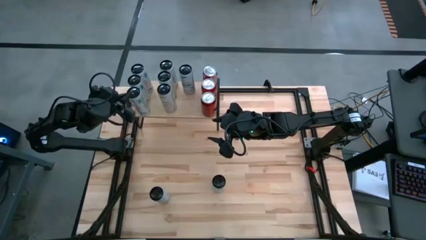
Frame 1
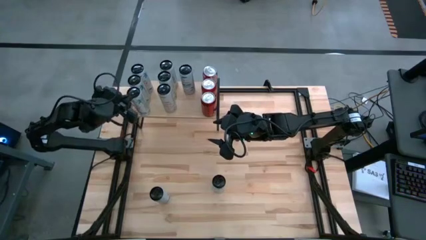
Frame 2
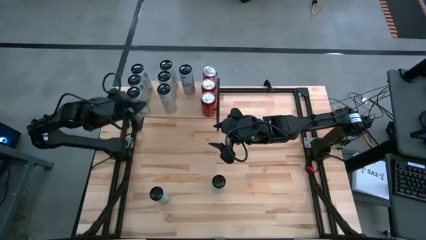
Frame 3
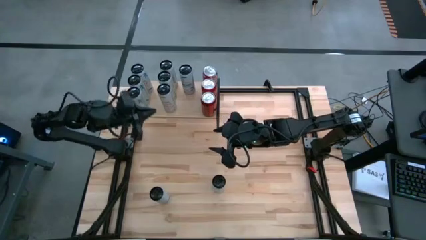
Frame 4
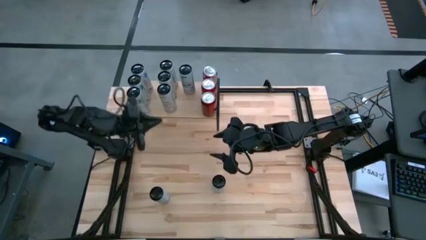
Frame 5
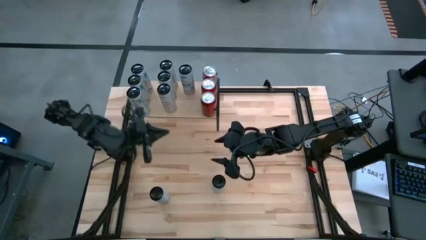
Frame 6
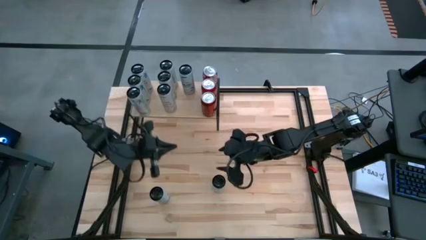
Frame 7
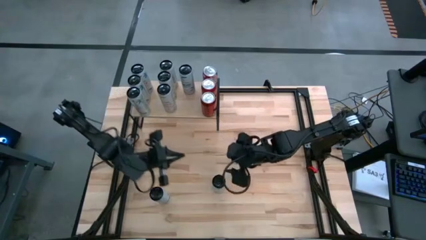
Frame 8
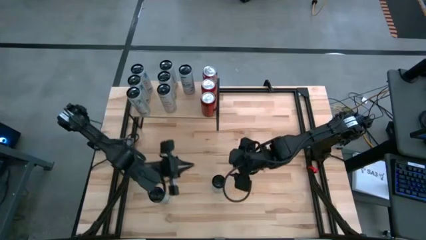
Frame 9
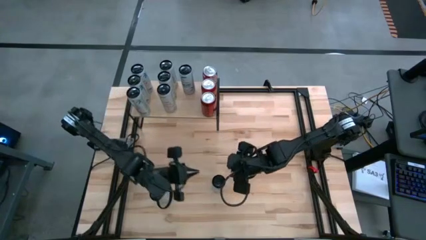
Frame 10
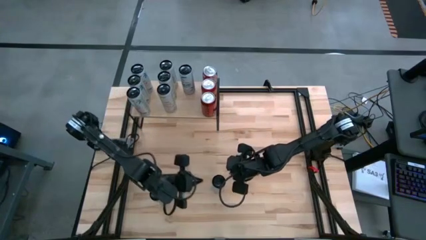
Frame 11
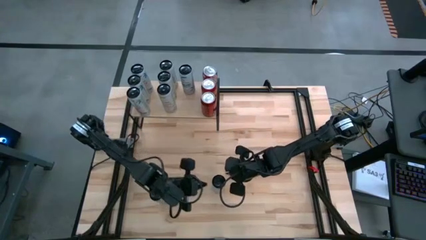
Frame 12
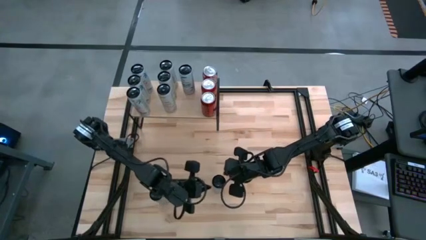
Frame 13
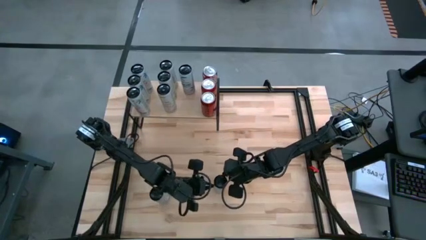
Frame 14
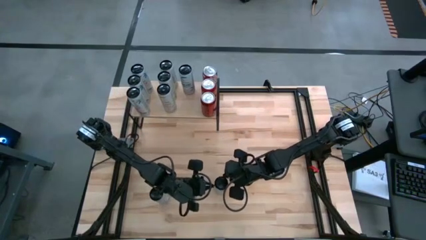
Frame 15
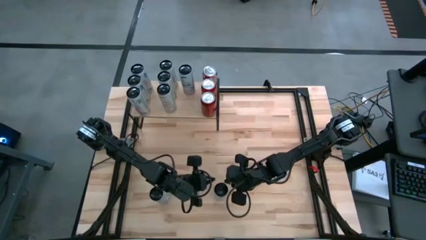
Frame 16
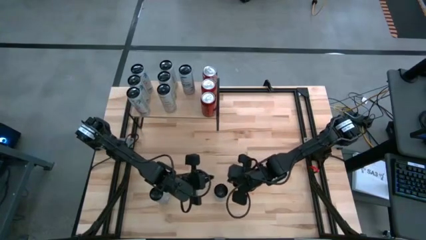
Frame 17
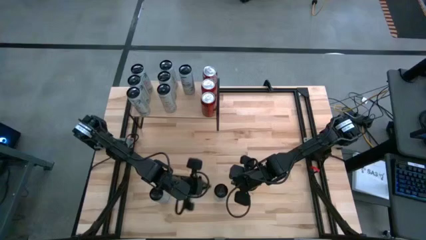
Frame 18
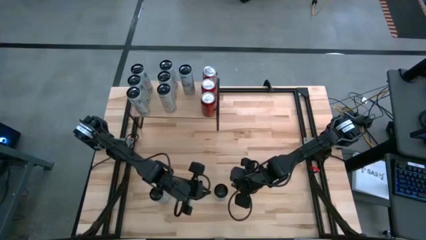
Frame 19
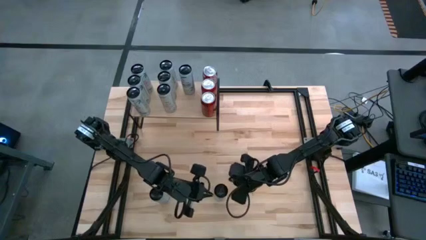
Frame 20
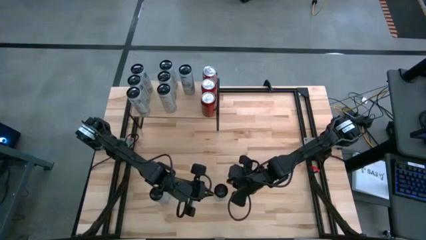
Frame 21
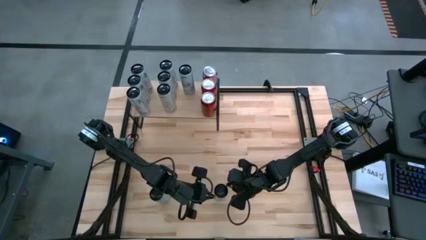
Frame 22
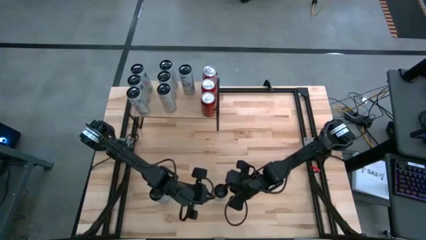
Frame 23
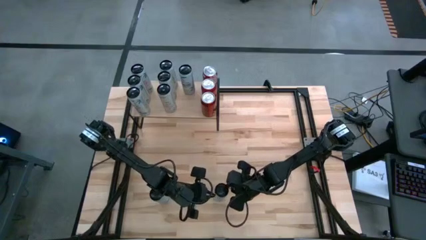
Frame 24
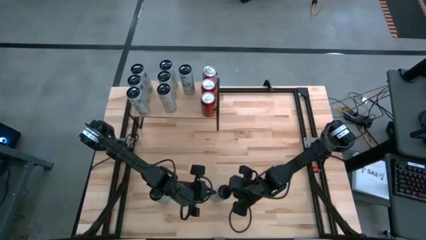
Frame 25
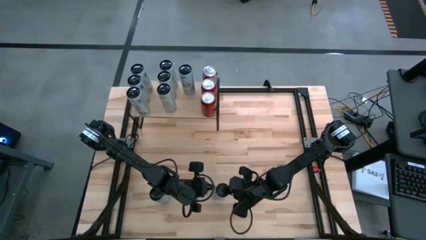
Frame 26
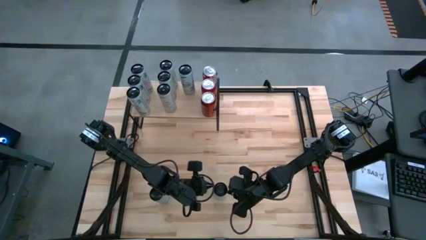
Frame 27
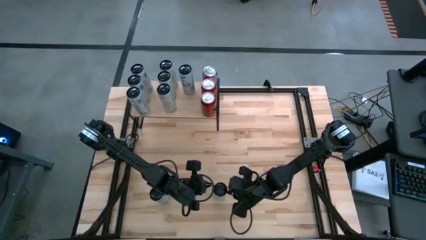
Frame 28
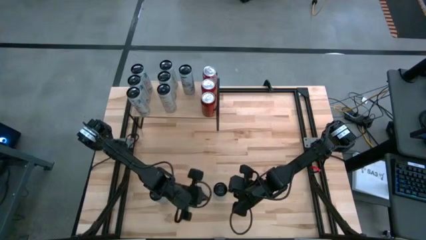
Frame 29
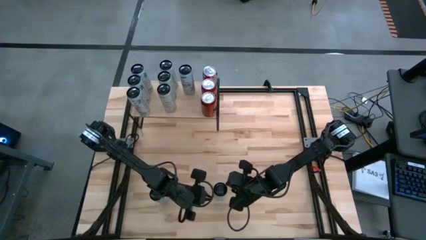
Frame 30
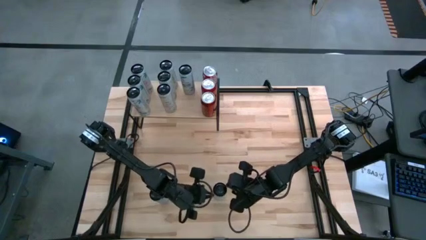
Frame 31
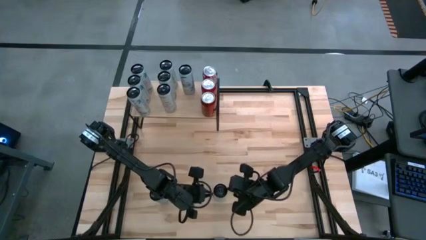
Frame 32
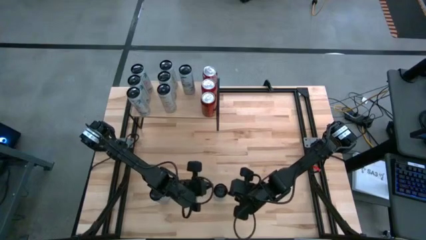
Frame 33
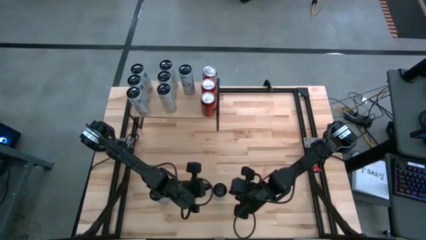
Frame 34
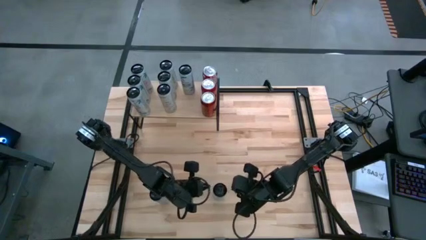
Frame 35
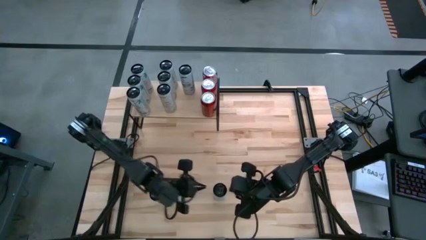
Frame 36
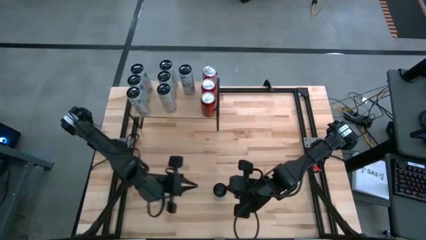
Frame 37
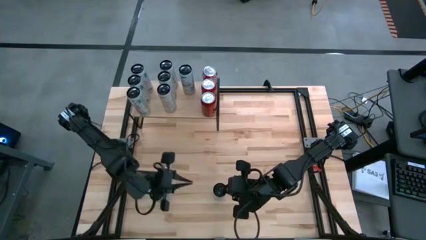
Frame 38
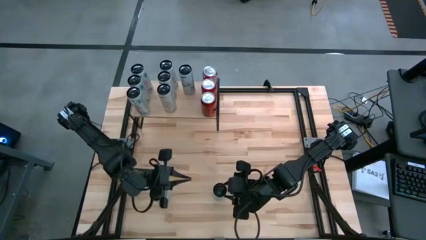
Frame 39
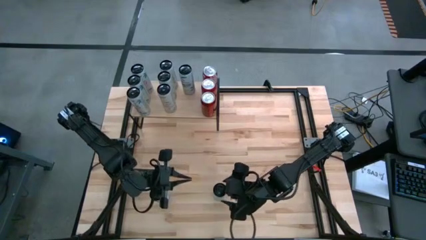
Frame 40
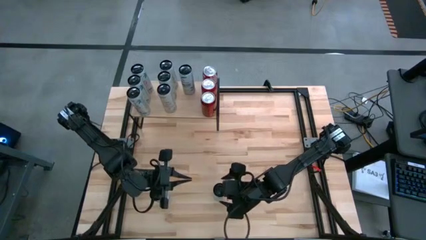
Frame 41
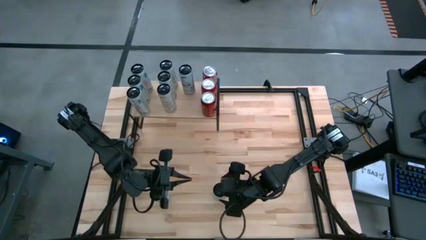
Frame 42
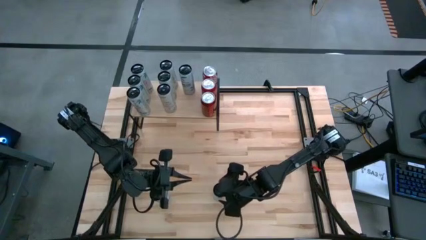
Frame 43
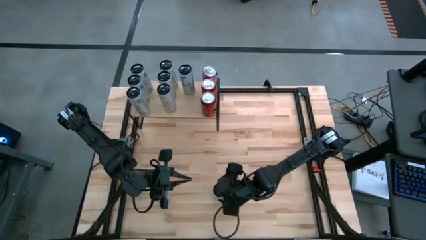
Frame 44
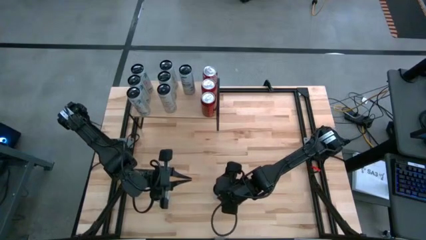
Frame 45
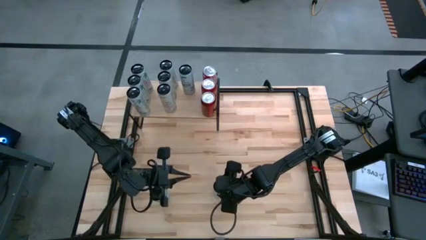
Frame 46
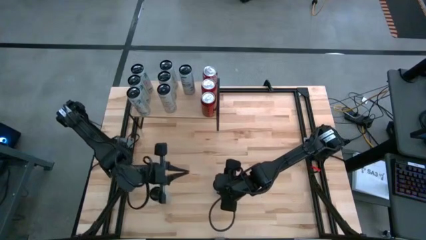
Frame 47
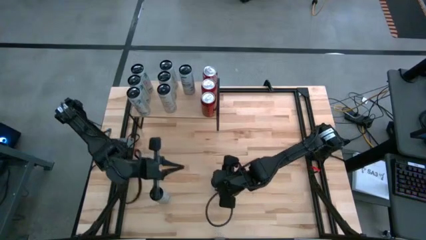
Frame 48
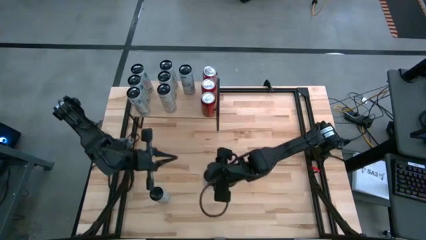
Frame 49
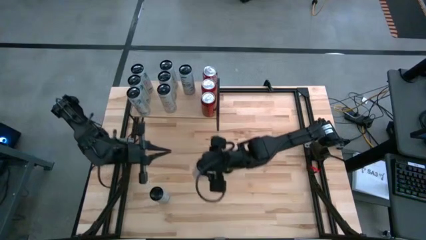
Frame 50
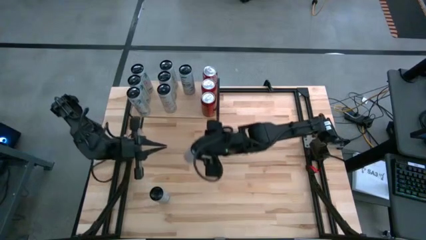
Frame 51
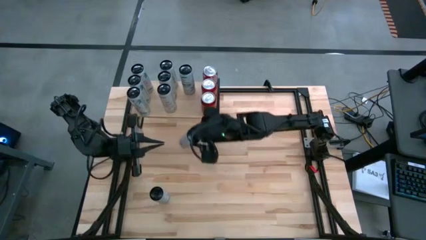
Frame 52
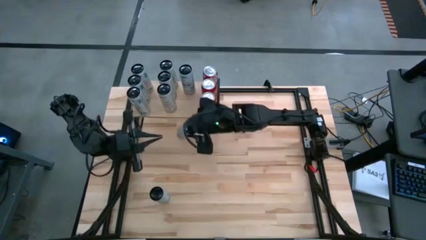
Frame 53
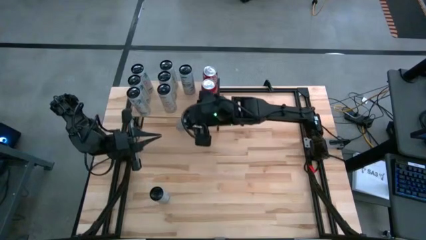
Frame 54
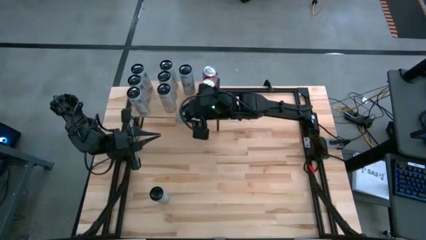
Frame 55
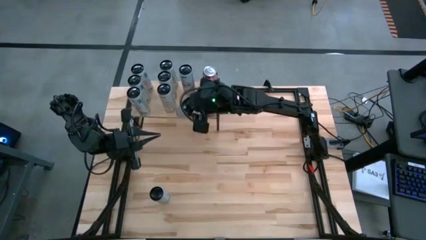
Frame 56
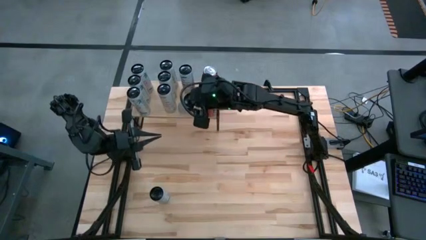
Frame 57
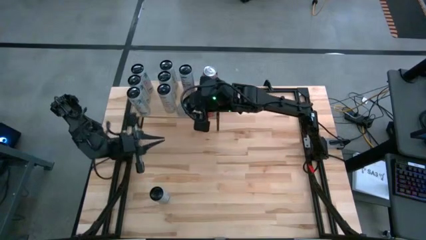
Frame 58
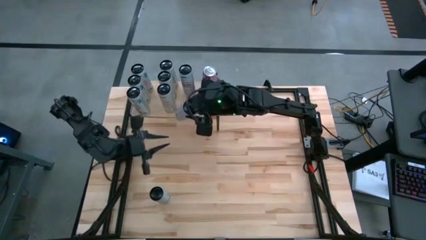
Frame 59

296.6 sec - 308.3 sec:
Task: Place canned beverage on shelf
Put the right white blue soda can on the shelf aligned with the other white blue soda can

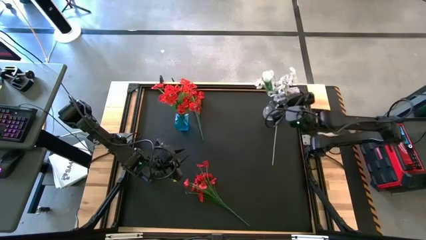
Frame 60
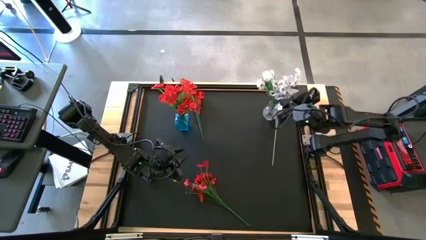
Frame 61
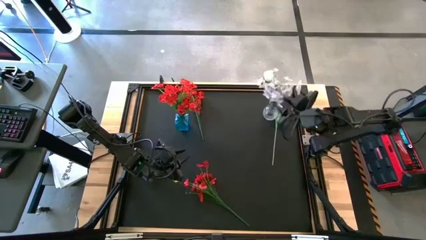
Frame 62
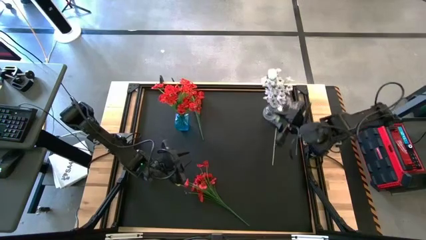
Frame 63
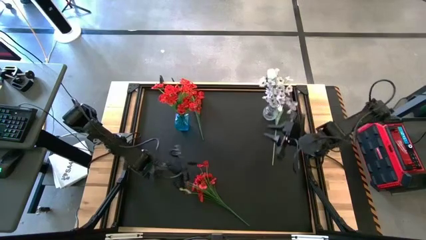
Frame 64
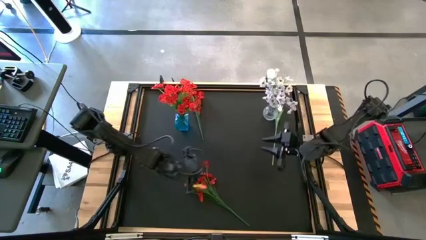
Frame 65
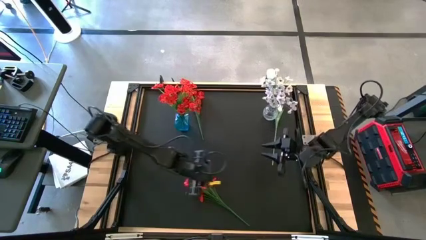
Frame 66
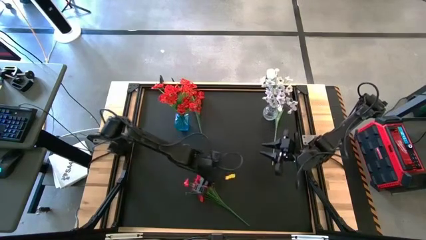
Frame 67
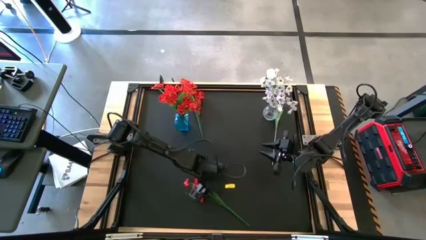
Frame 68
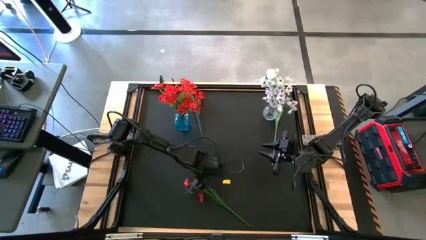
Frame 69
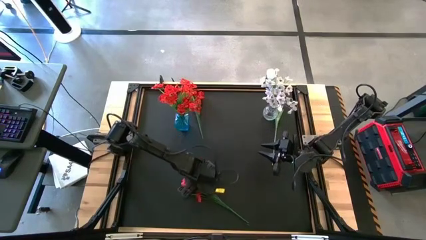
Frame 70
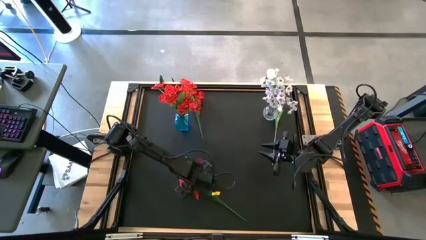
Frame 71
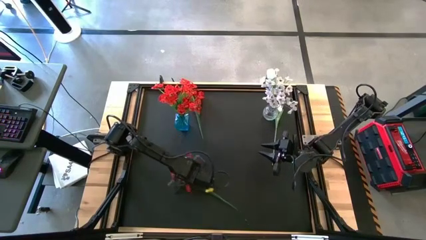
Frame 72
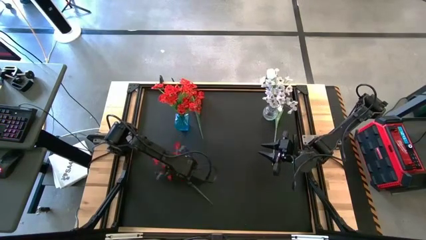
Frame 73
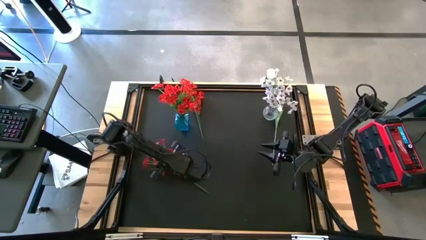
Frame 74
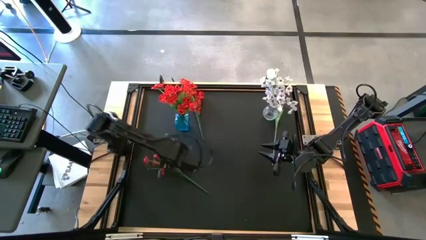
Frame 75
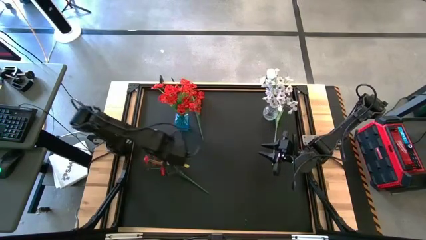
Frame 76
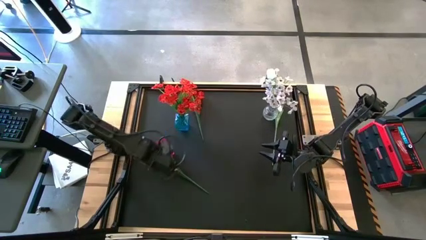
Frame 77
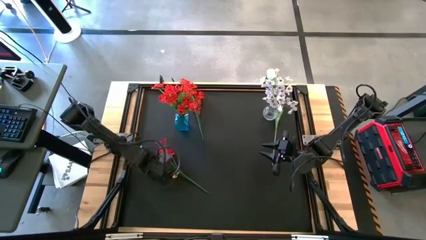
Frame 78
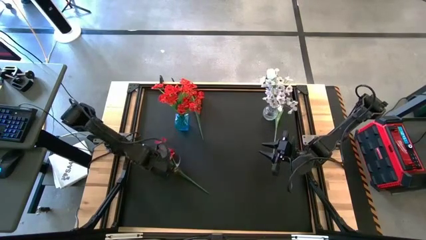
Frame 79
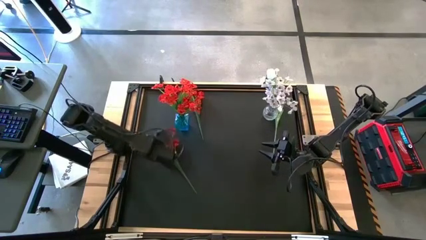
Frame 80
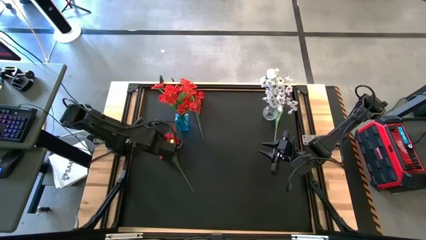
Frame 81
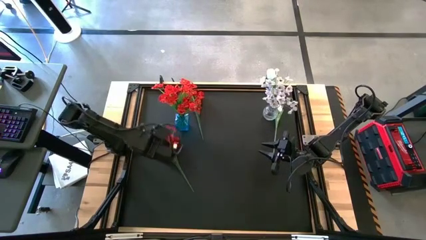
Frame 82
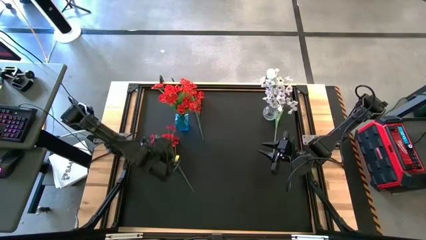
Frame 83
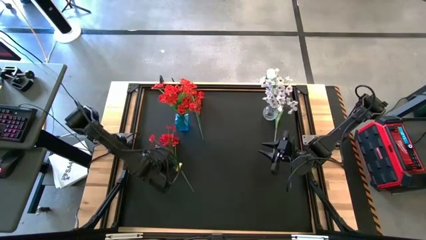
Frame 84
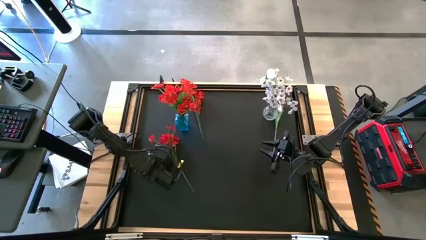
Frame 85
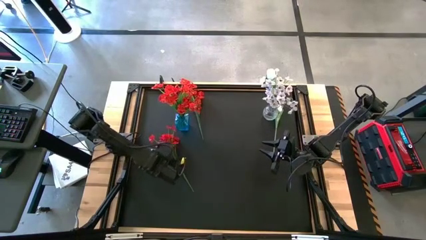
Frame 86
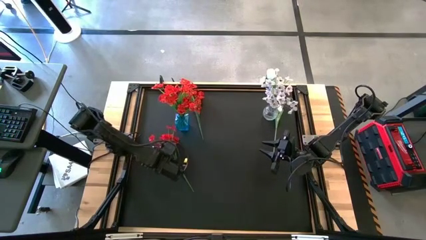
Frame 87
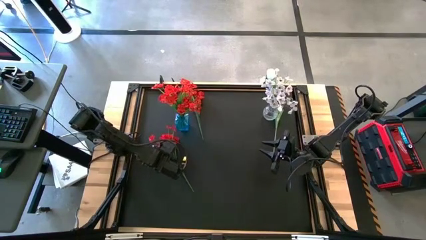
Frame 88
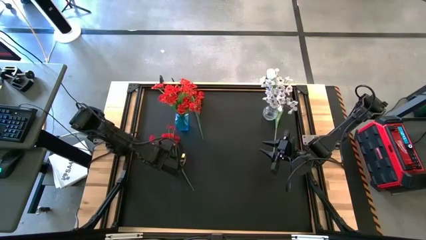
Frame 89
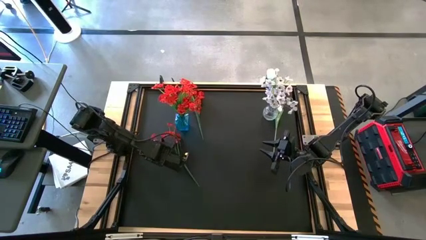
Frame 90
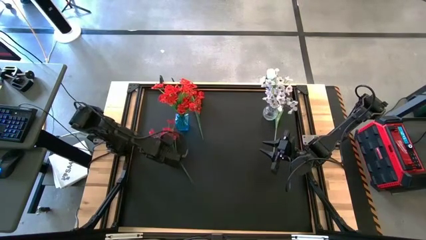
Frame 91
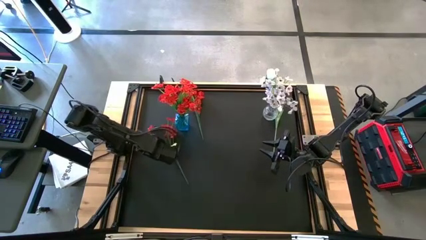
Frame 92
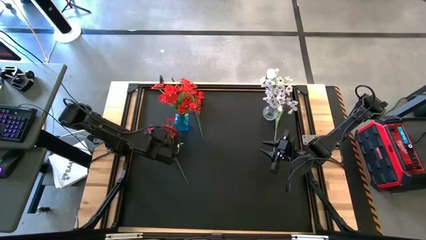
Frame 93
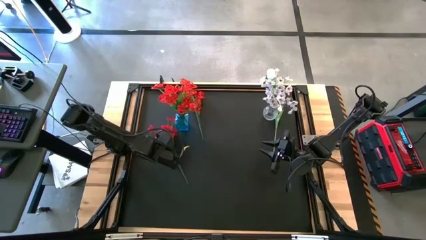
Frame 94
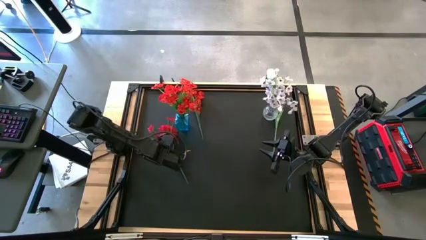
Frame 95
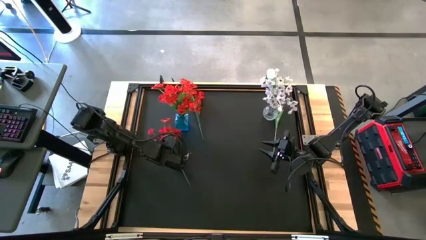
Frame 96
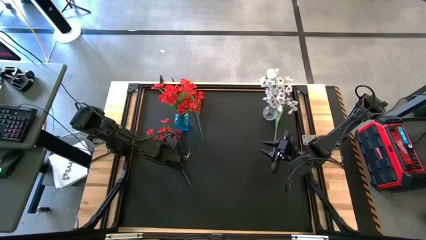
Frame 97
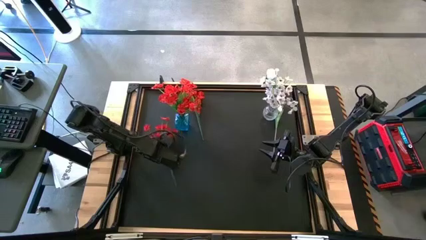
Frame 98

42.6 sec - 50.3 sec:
Task: Sort flowers into vase by color
Put the bottom red flowers into the blue vase
